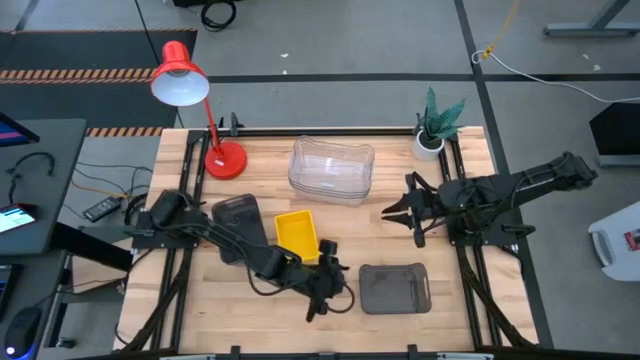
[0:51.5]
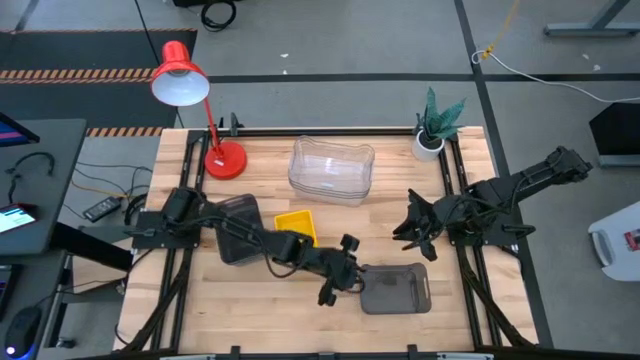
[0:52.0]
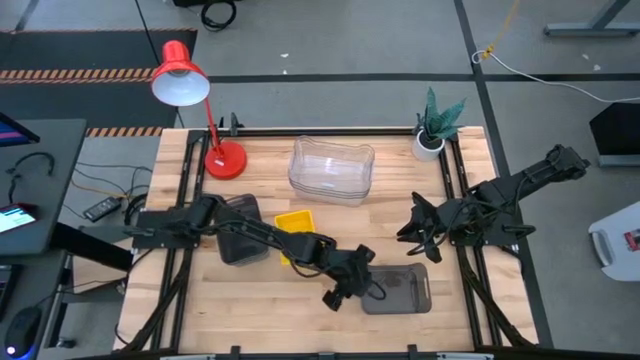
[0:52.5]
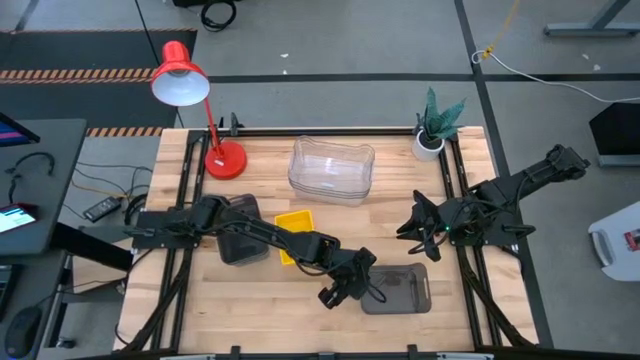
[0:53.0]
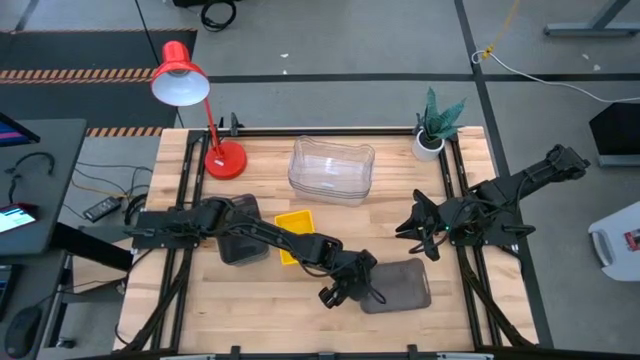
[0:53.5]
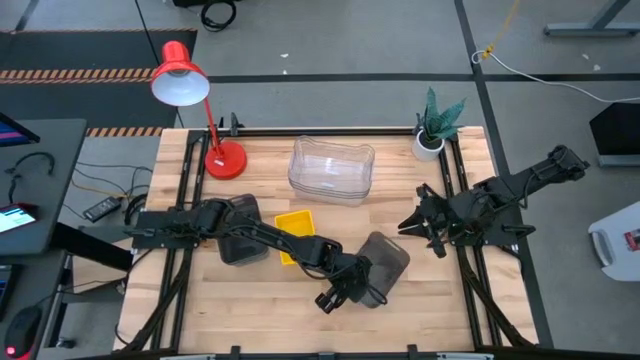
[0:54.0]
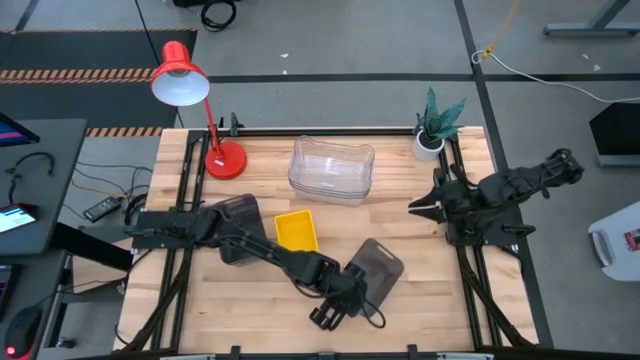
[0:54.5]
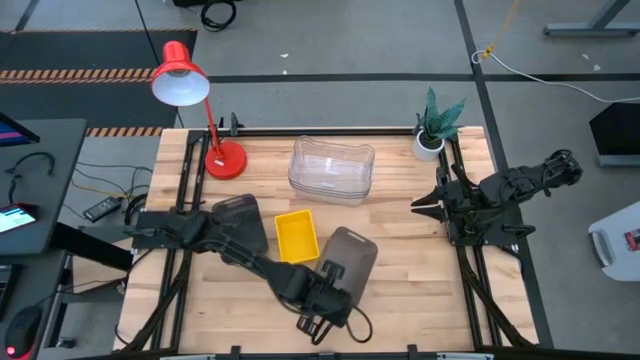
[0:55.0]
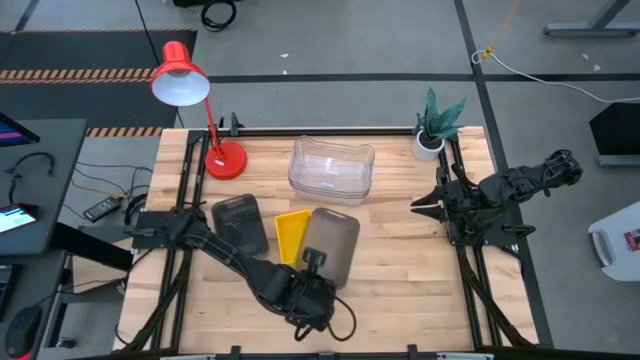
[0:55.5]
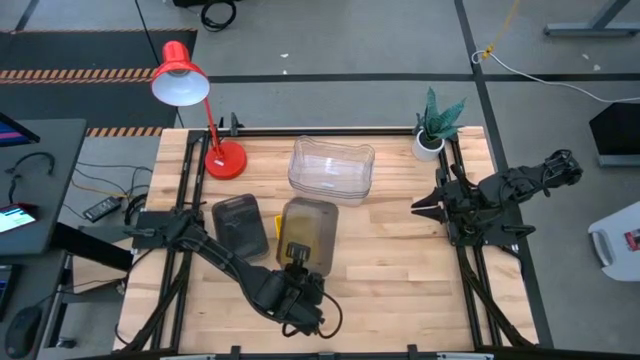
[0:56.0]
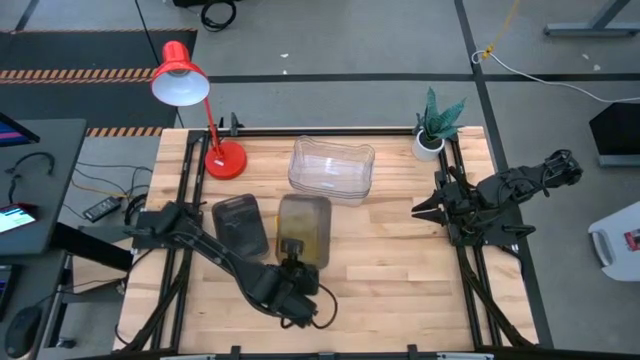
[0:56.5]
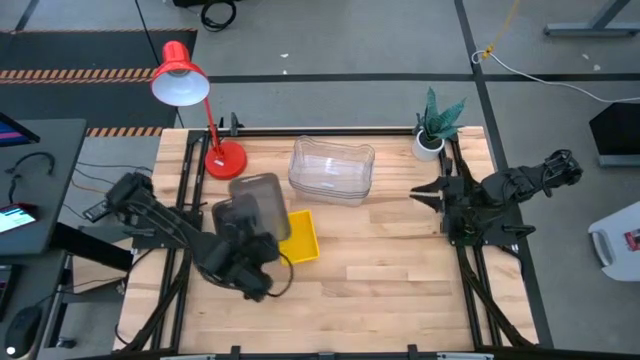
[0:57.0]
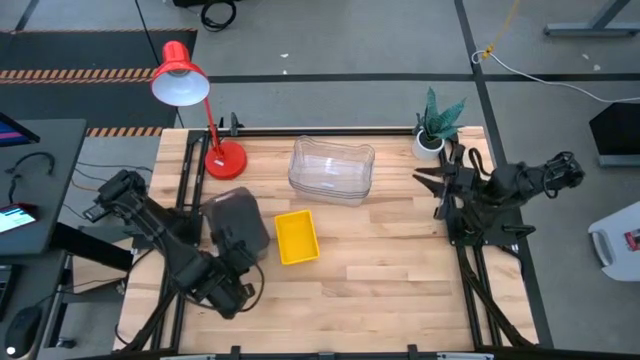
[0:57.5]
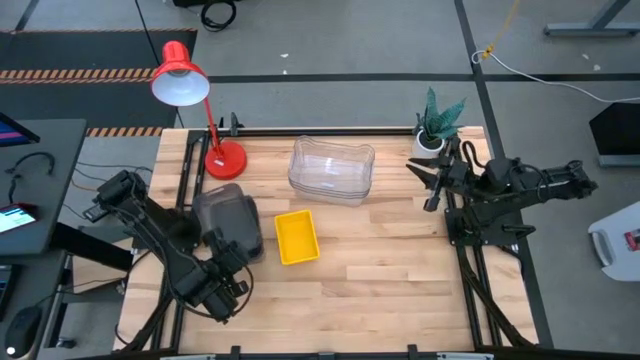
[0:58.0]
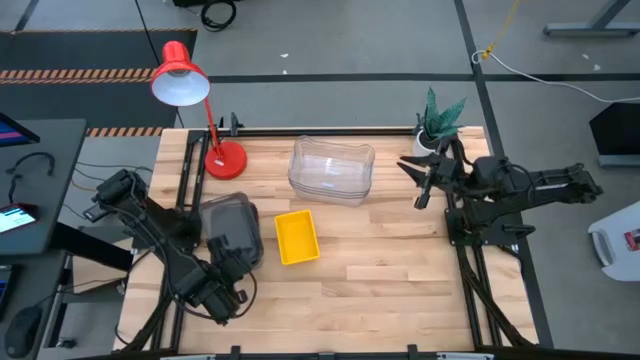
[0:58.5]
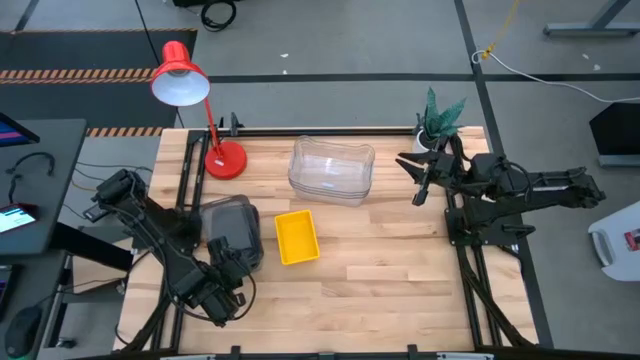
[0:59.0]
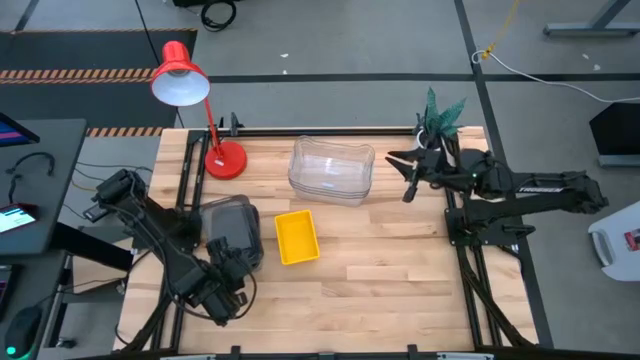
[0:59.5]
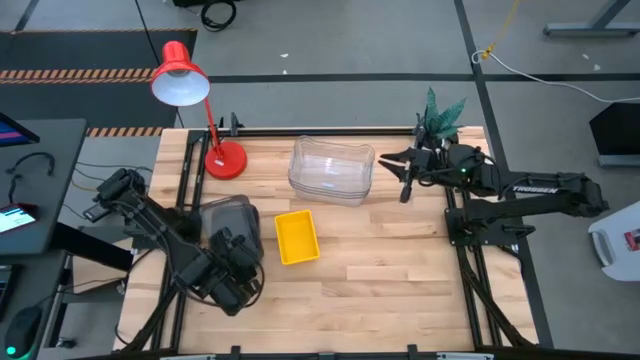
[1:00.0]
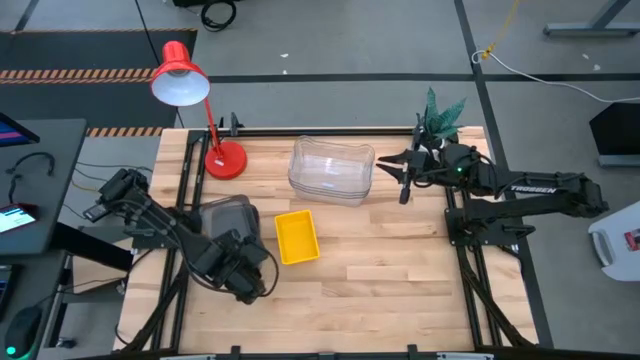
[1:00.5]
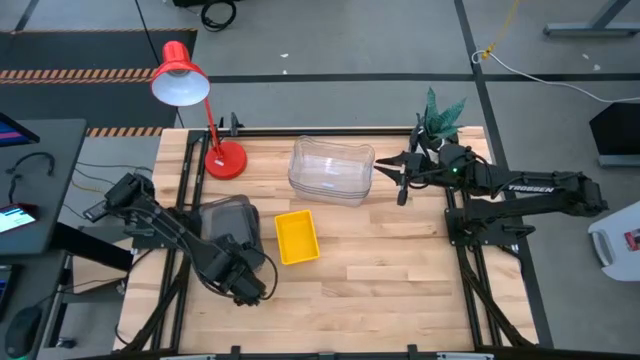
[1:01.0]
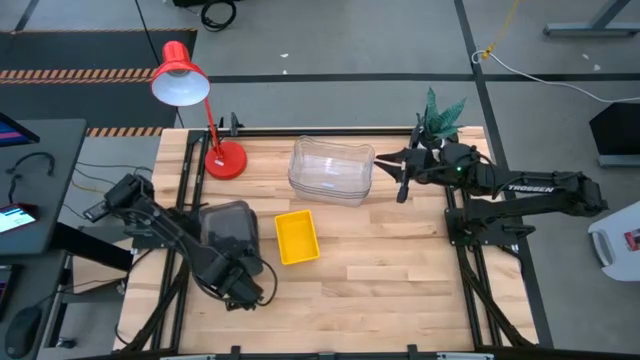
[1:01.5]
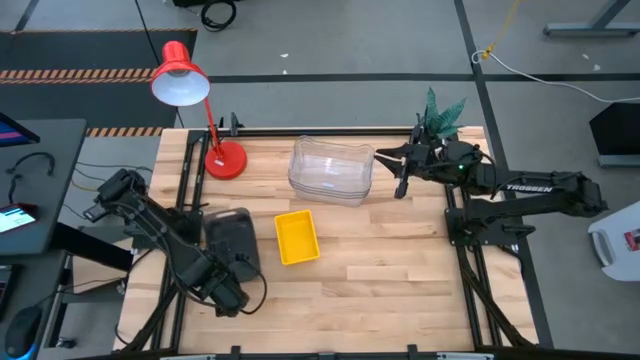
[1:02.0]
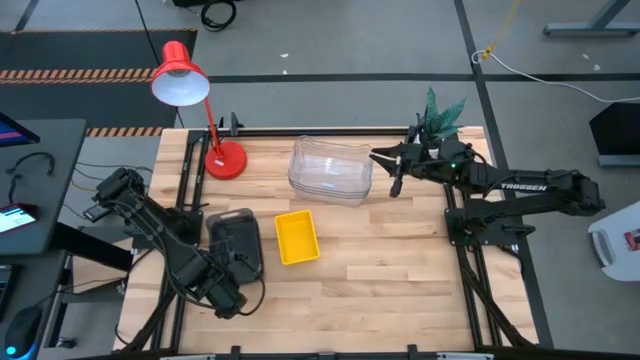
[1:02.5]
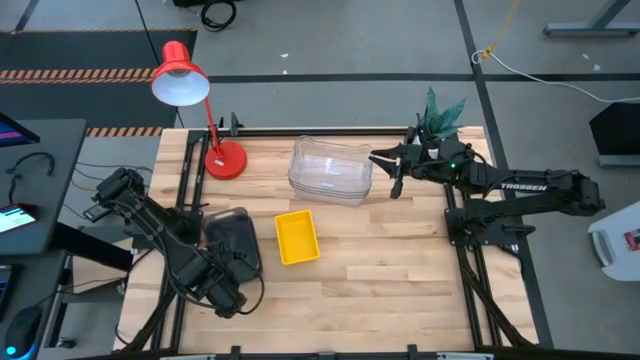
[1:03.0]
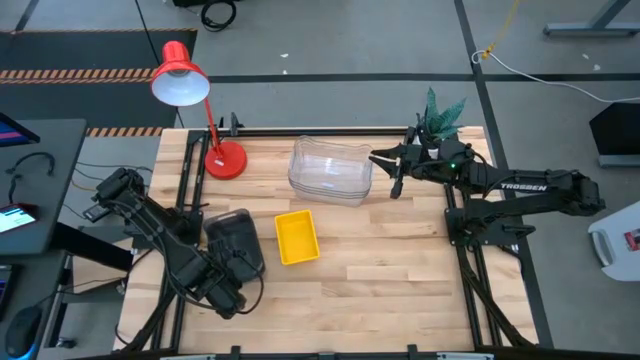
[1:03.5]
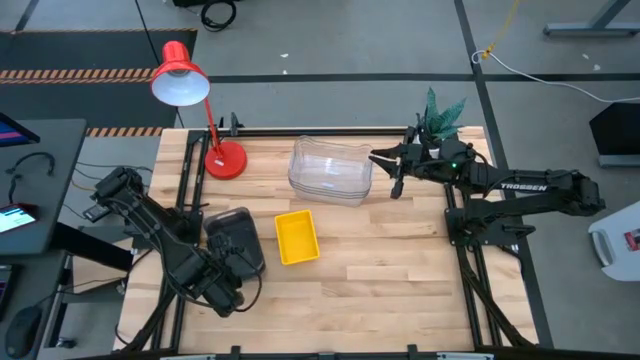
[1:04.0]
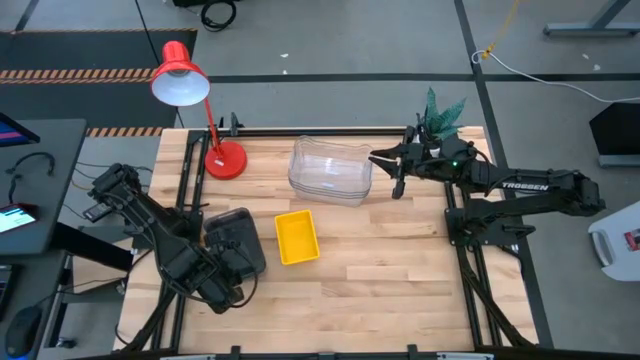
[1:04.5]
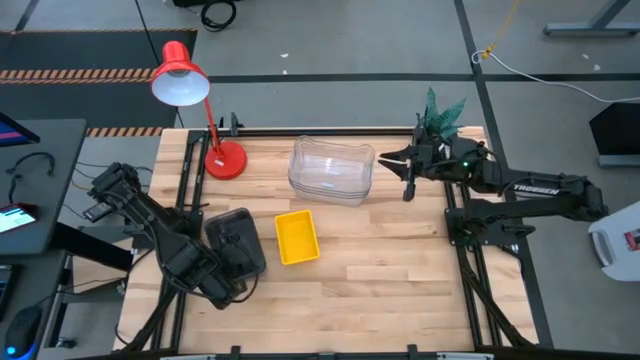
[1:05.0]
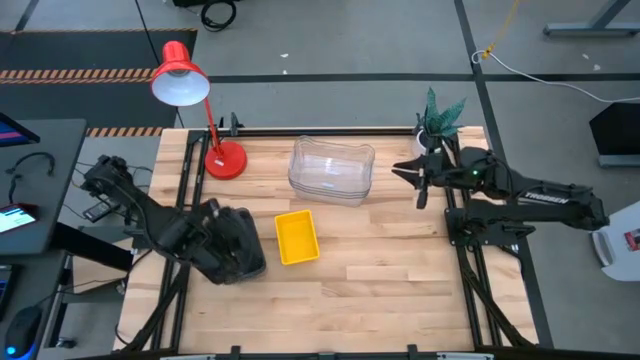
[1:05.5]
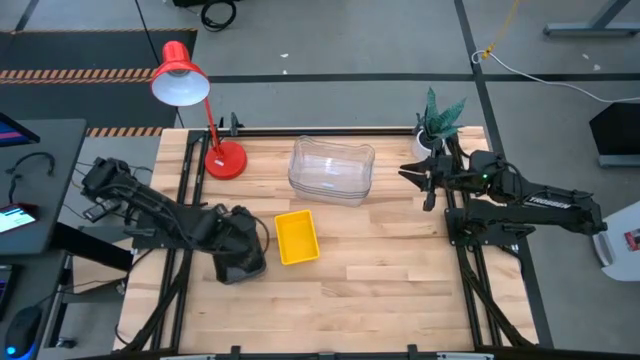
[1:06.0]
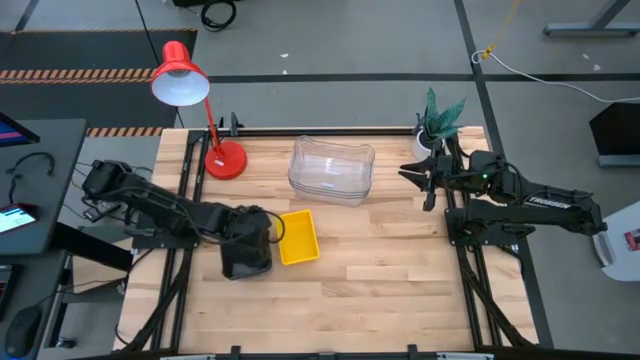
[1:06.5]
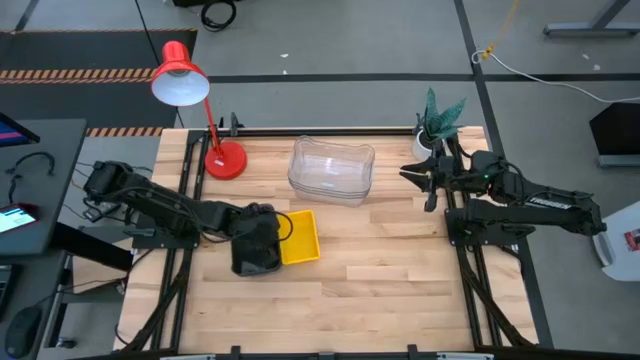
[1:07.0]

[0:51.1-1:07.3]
Stack the right black bin on the top of the stacked black bins

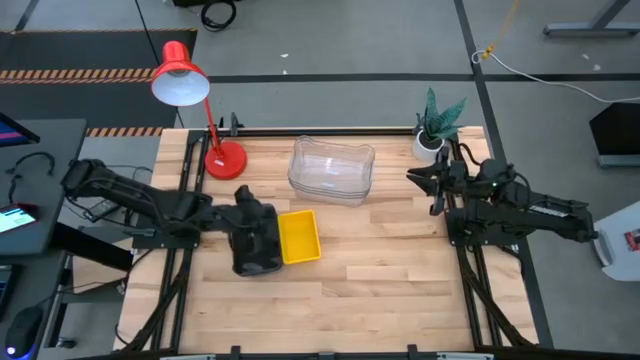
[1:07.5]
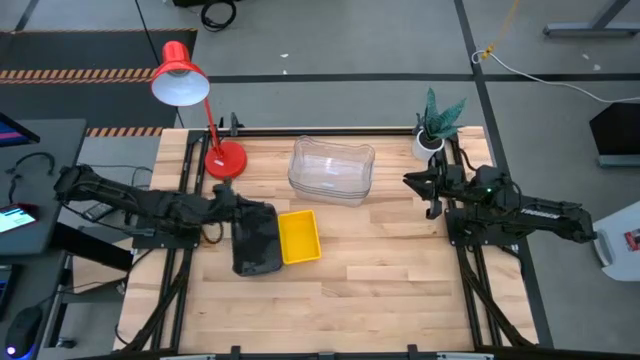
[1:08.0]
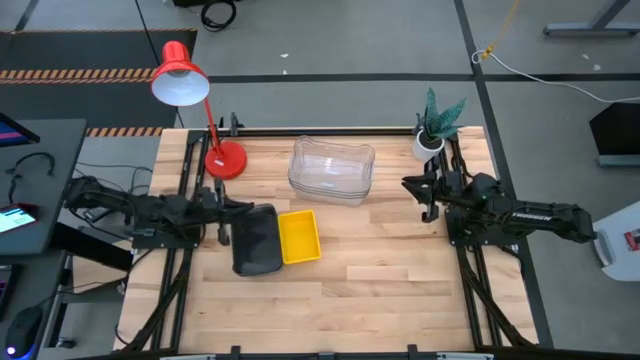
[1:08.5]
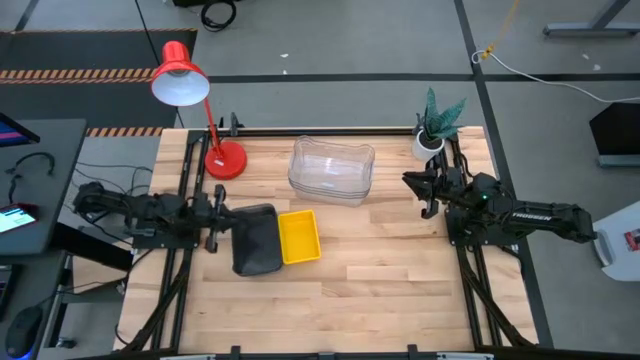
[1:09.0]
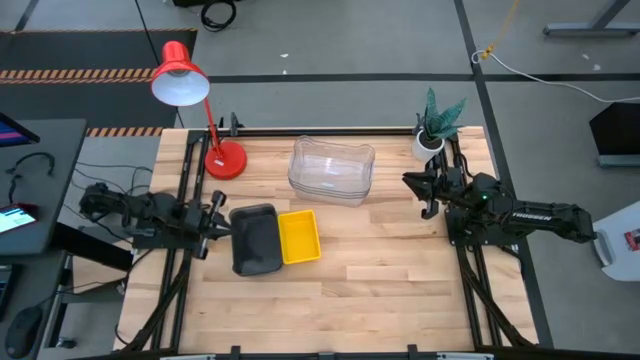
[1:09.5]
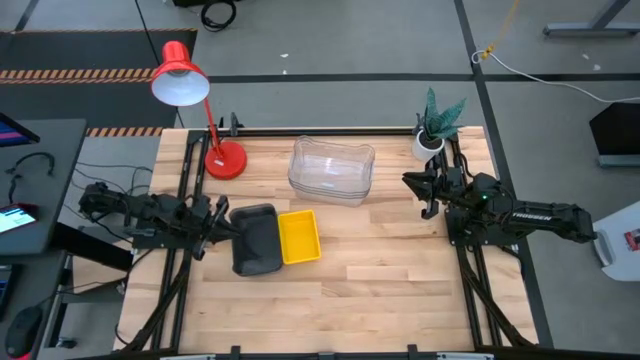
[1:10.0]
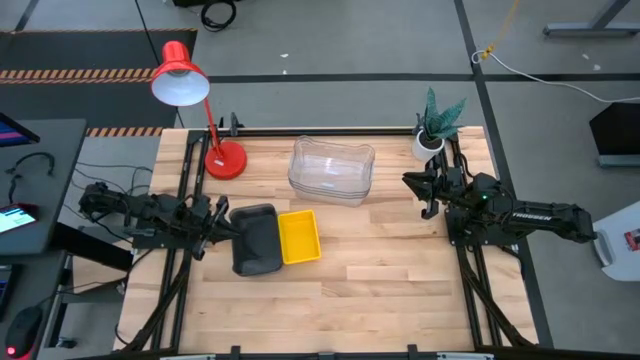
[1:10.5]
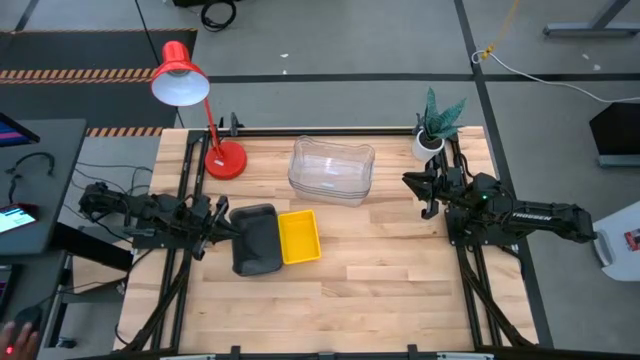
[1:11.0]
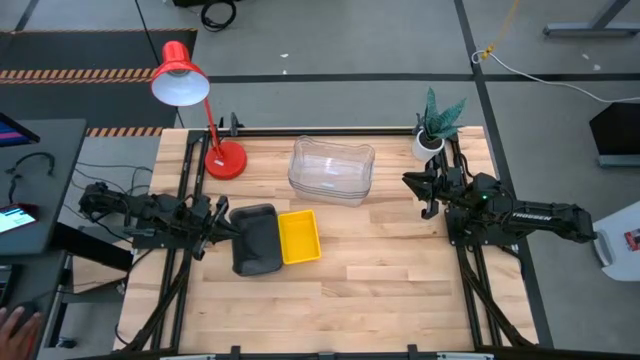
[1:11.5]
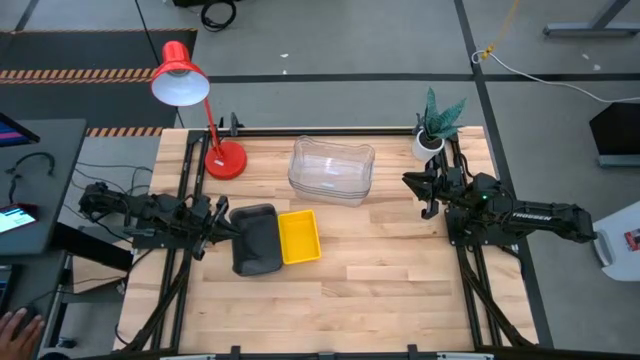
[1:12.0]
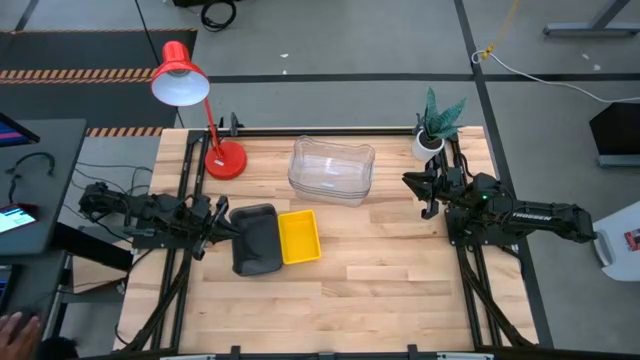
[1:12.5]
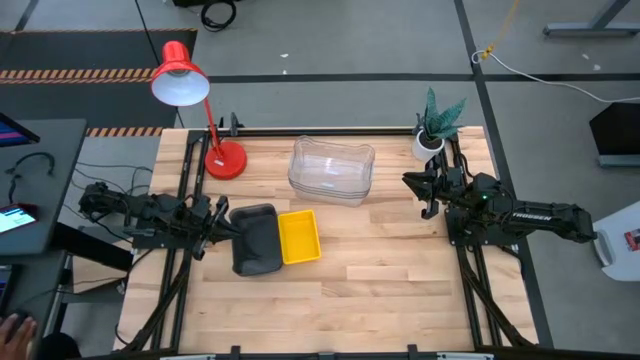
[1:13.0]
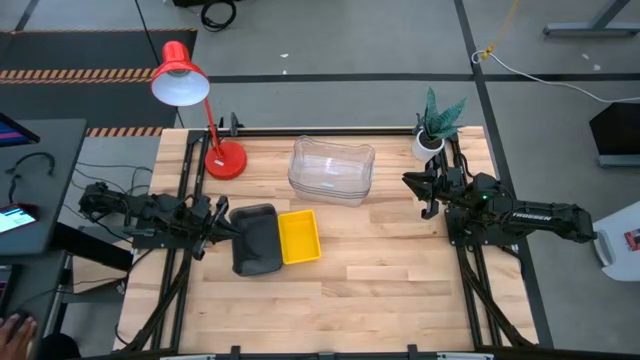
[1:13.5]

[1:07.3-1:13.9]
Return to Home Position
